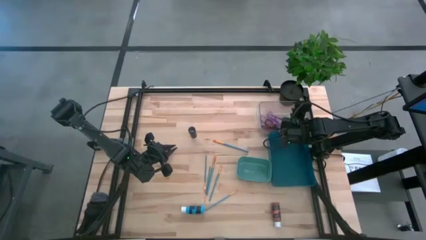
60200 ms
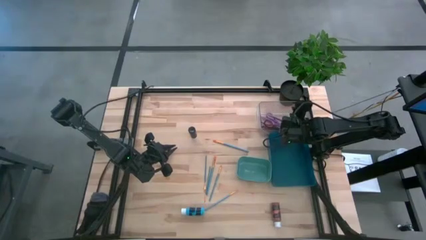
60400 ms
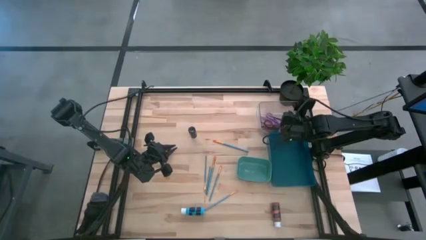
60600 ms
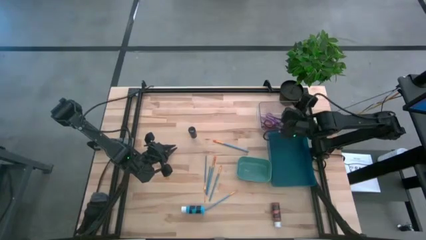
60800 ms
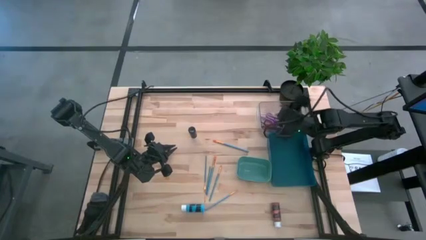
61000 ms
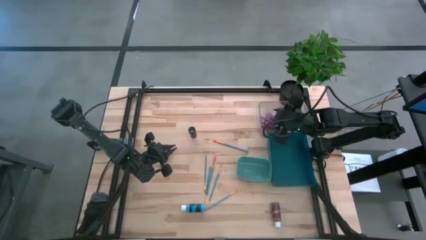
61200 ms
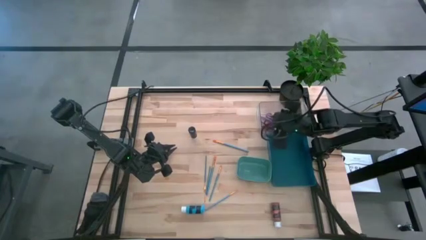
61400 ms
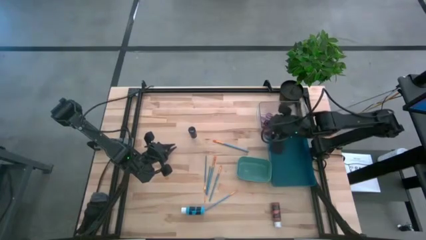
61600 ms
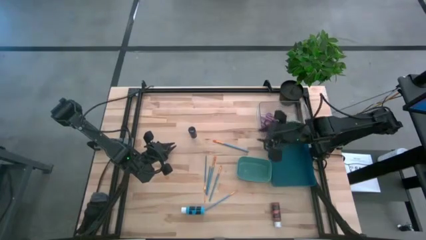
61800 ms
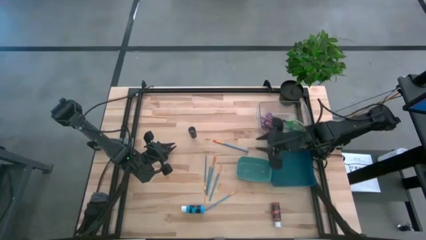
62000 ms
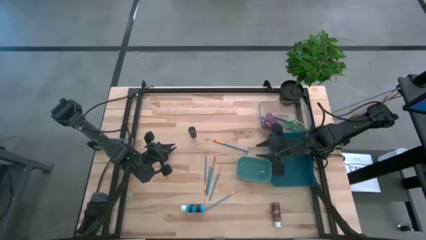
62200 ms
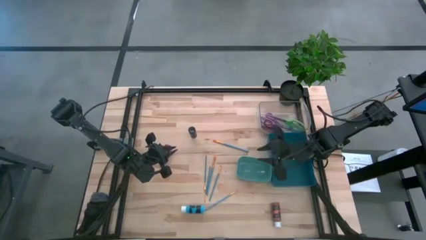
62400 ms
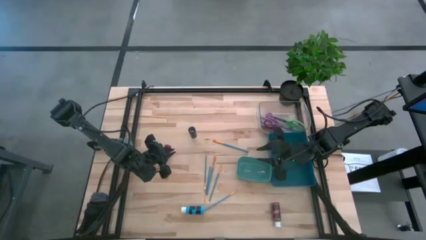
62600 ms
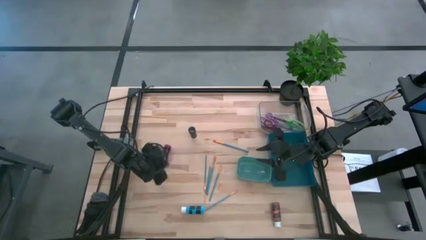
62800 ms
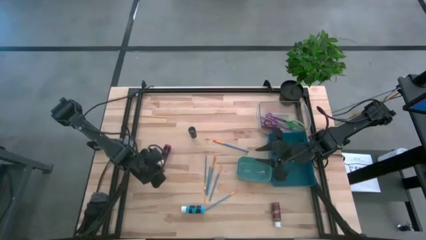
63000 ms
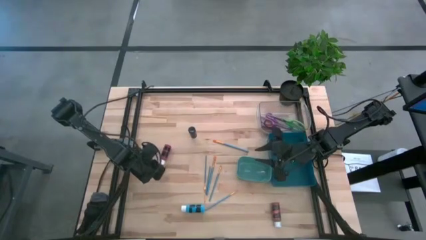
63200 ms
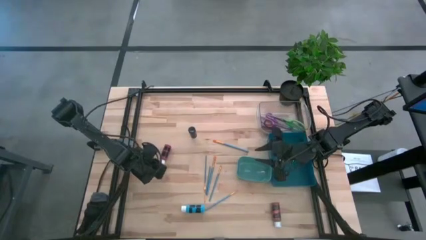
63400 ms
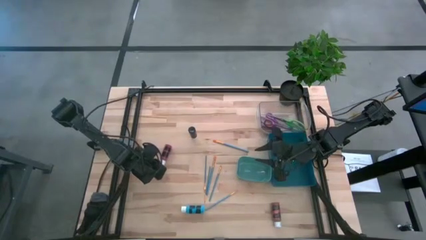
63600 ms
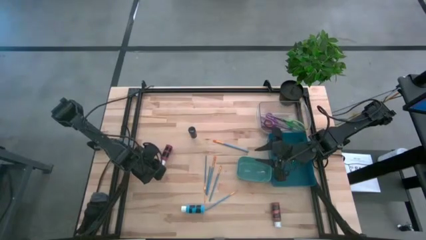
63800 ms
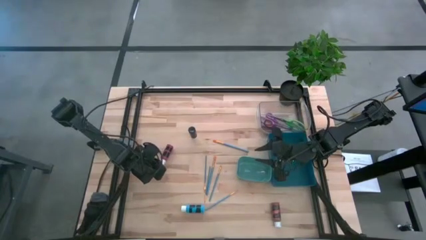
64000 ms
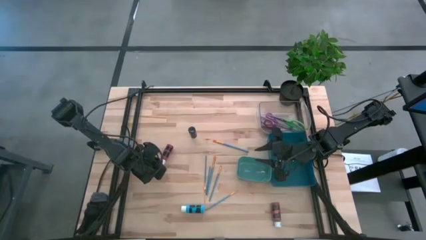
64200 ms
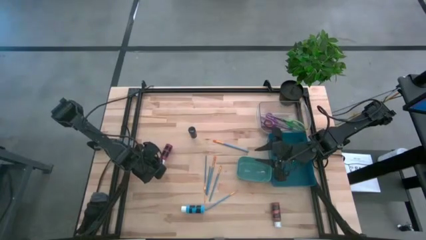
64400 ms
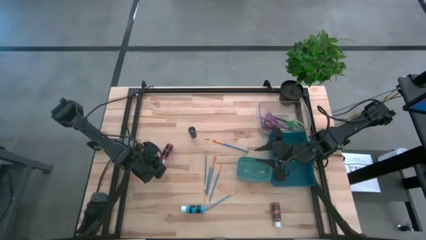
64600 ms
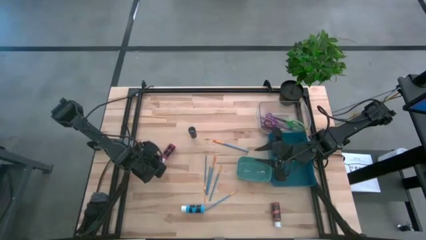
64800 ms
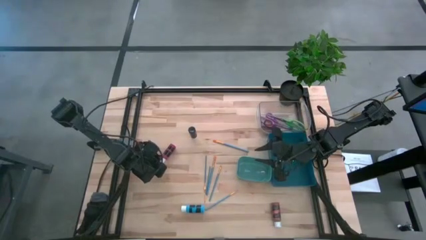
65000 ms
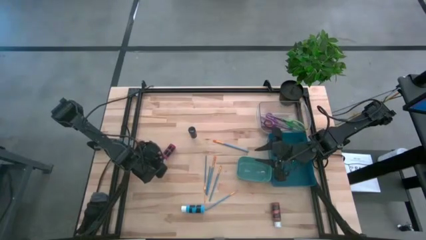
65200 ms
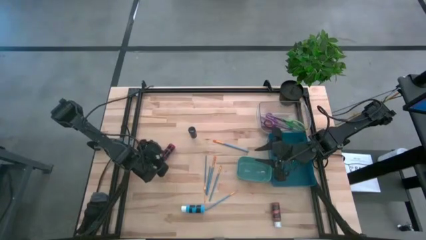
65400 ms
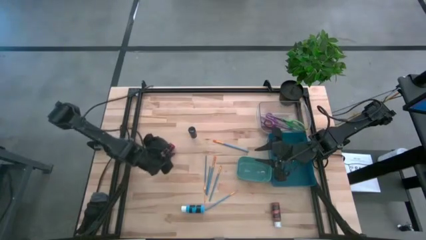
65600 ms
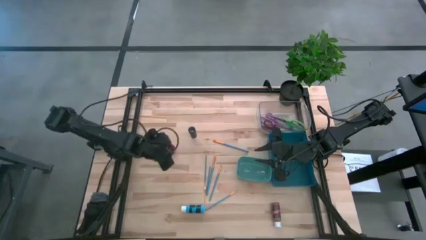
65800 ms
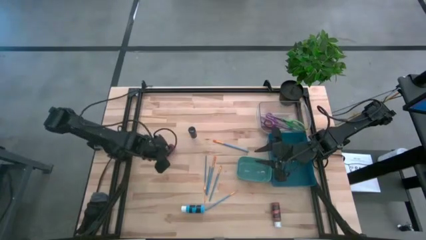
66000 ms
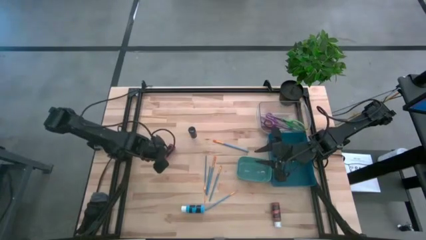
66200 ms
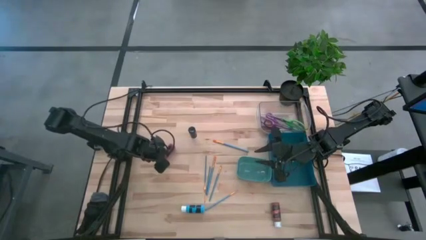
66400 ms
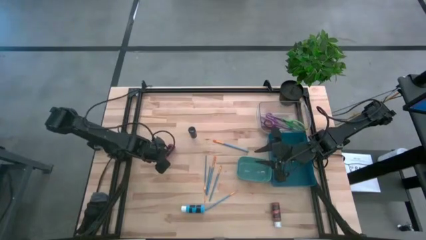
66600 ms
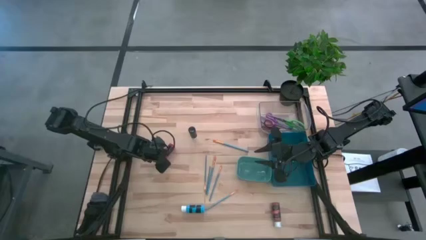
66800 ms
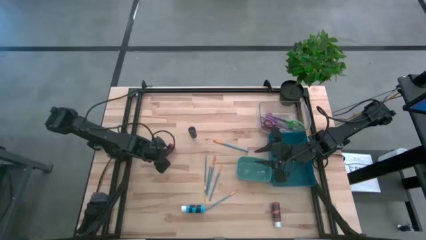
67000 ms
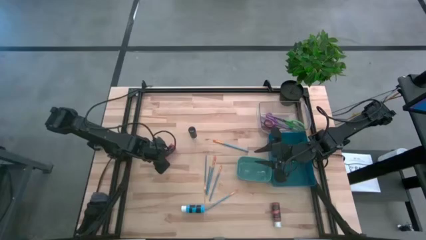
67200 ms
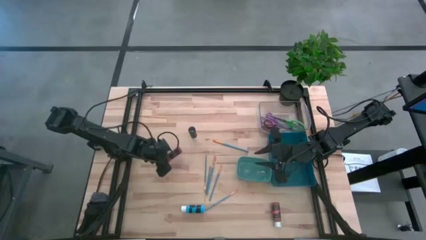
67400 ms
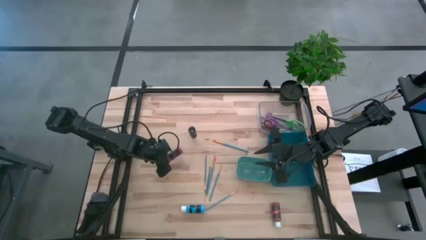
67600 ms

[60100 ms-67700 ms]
Task: Pick & Place Paint Supplies
Put the red paint bottle into the green bin

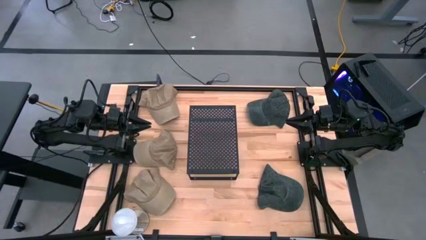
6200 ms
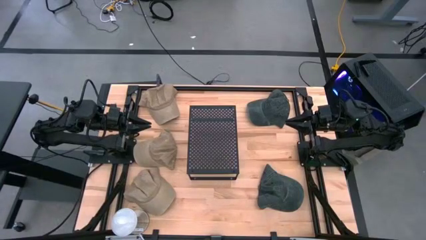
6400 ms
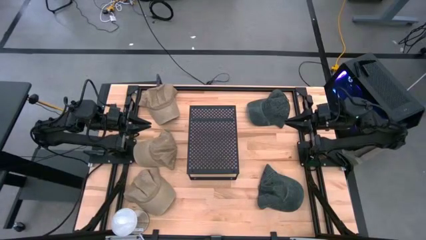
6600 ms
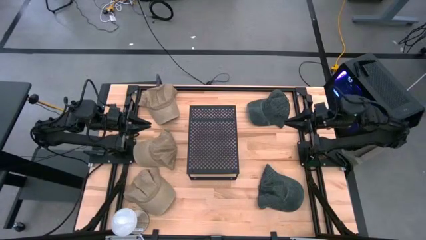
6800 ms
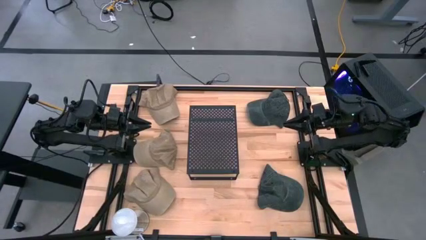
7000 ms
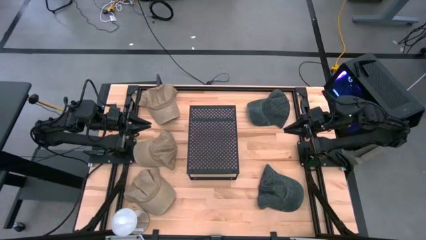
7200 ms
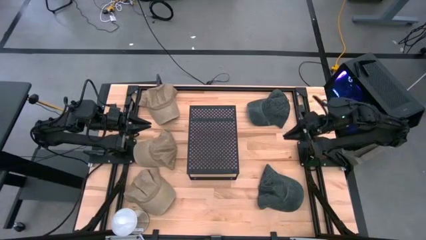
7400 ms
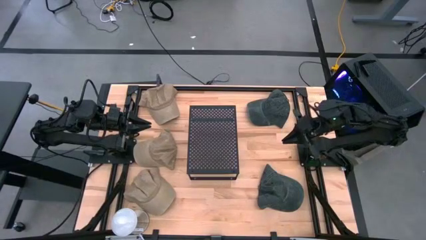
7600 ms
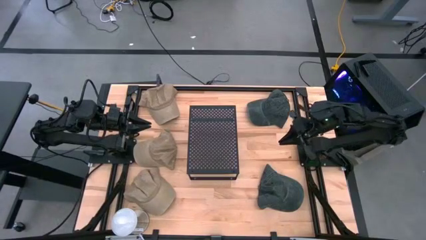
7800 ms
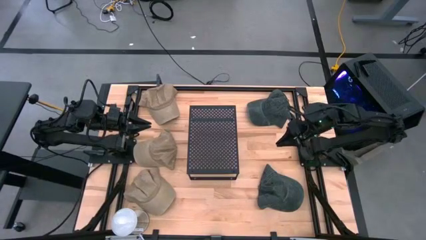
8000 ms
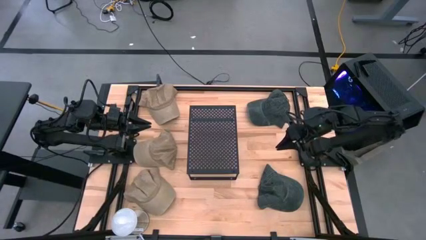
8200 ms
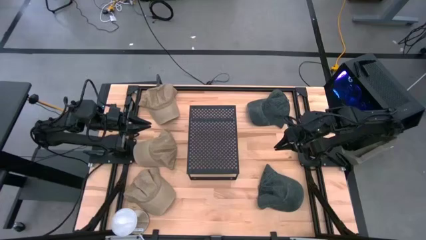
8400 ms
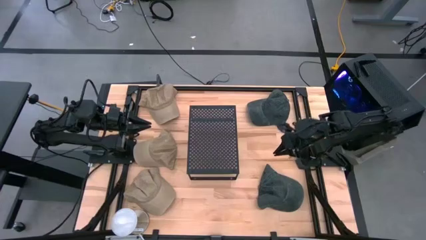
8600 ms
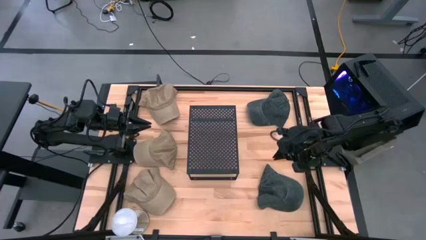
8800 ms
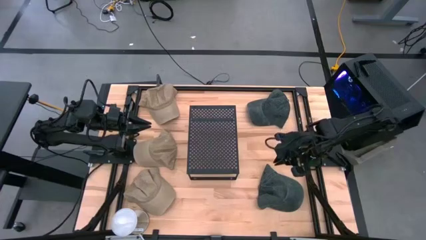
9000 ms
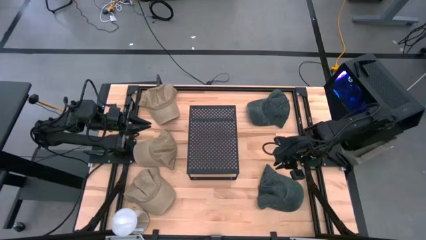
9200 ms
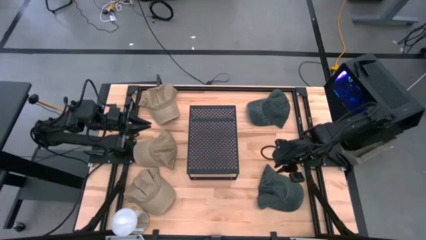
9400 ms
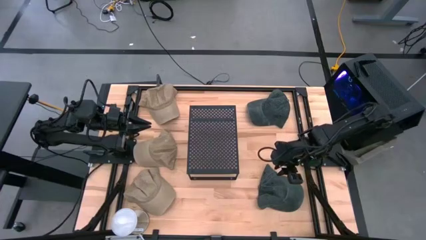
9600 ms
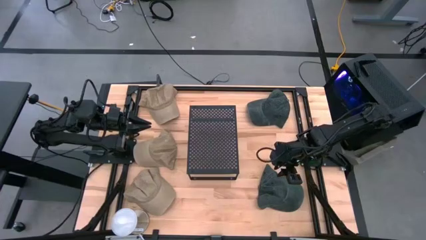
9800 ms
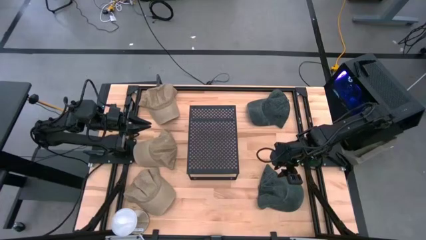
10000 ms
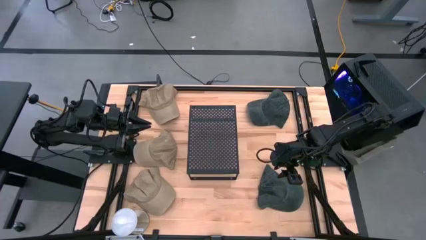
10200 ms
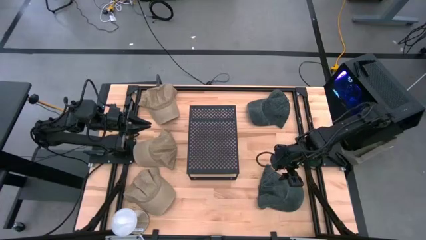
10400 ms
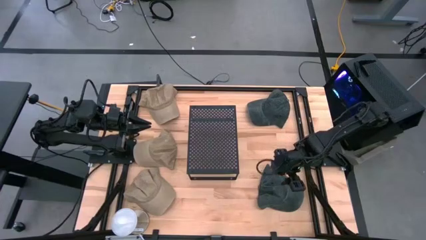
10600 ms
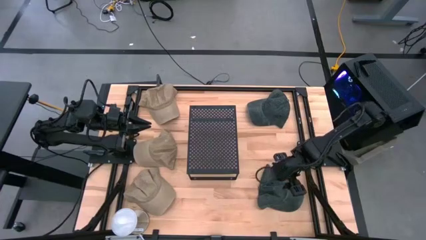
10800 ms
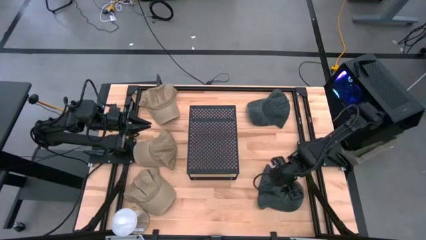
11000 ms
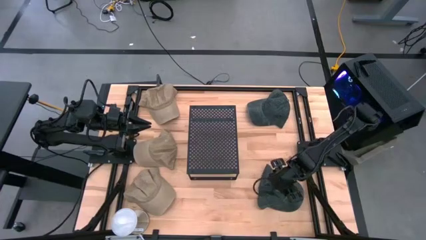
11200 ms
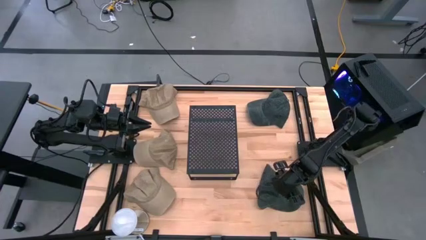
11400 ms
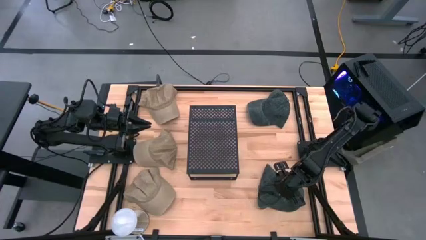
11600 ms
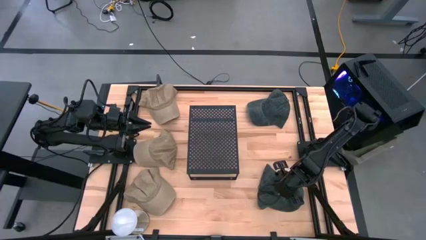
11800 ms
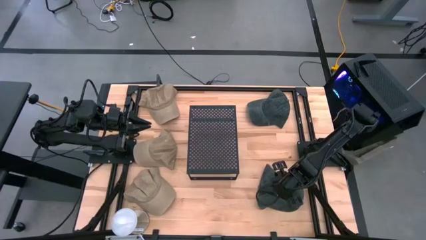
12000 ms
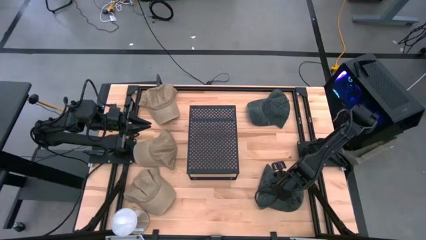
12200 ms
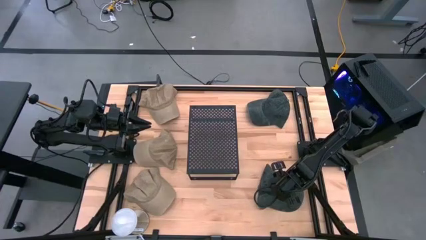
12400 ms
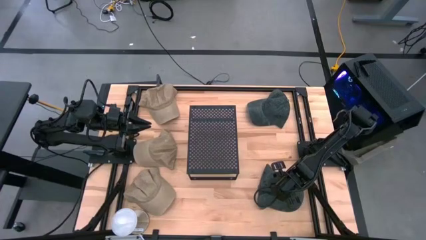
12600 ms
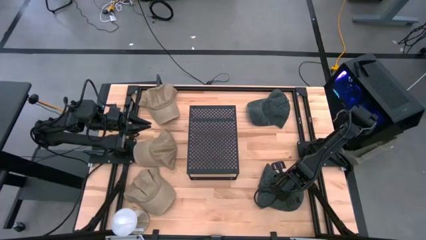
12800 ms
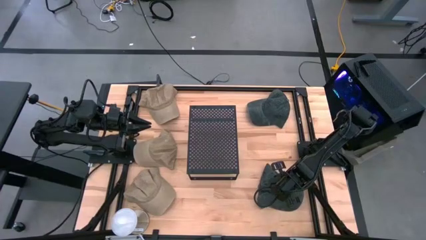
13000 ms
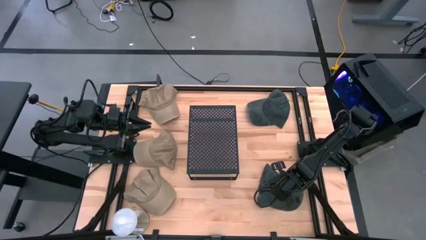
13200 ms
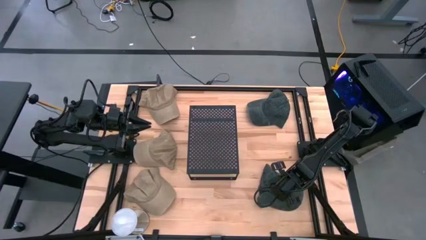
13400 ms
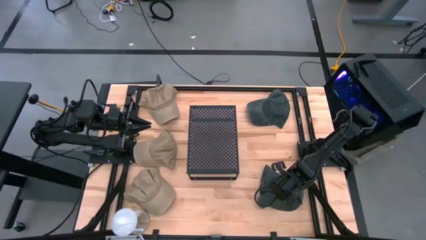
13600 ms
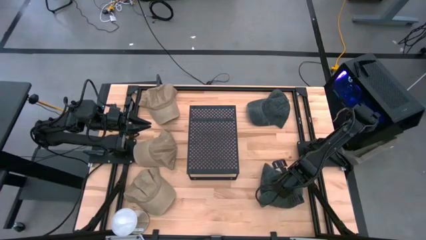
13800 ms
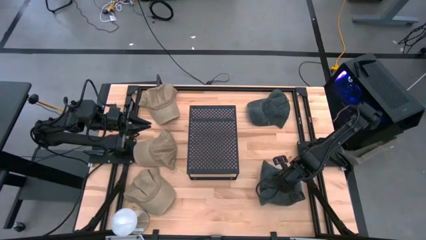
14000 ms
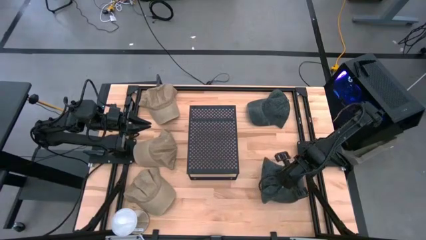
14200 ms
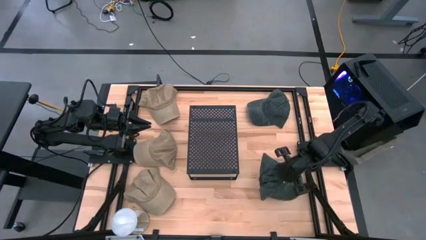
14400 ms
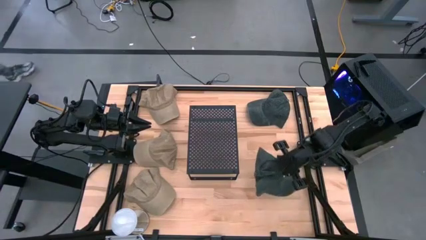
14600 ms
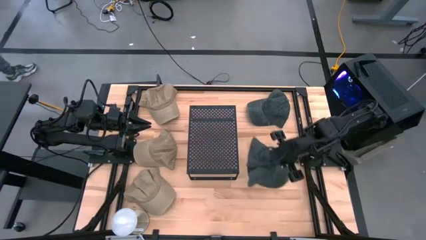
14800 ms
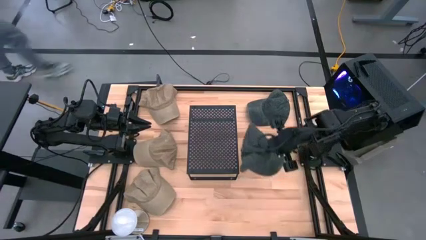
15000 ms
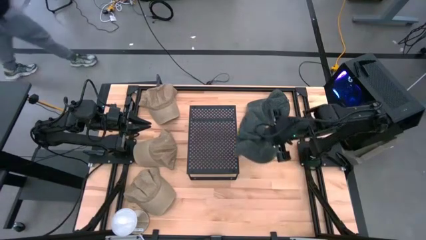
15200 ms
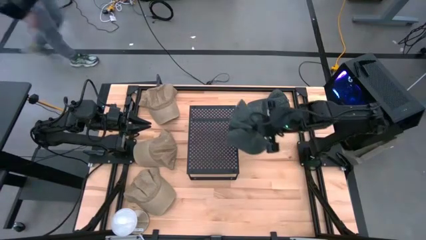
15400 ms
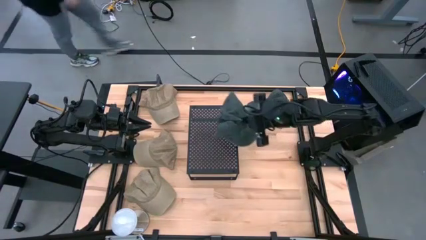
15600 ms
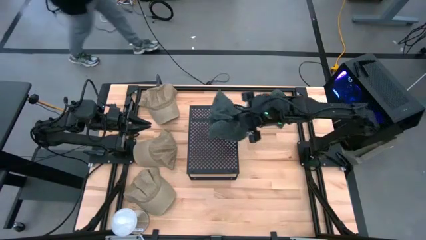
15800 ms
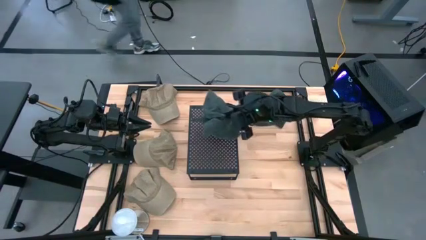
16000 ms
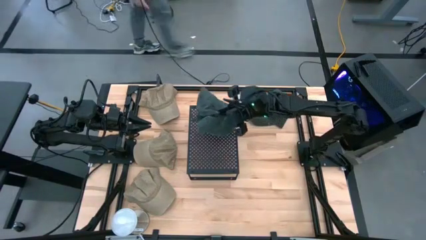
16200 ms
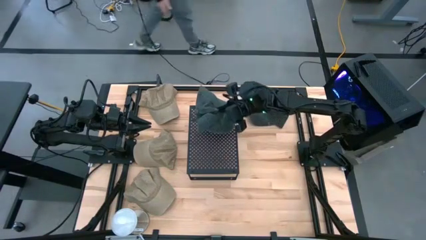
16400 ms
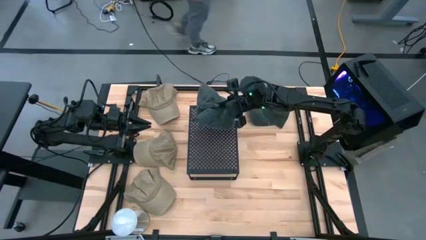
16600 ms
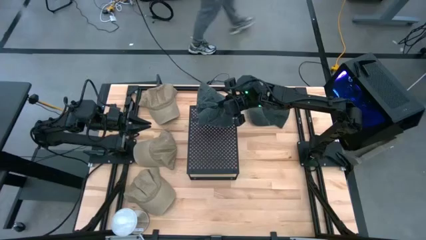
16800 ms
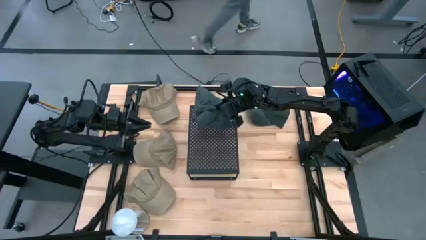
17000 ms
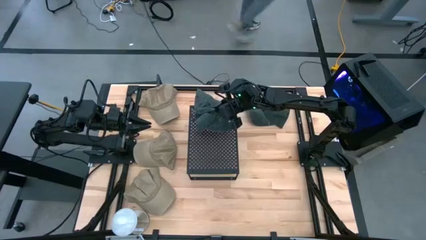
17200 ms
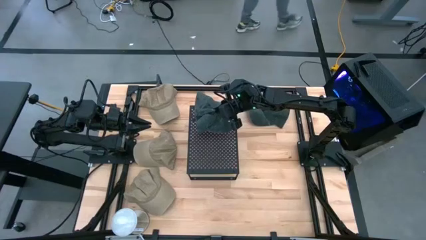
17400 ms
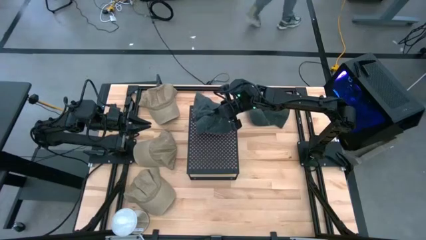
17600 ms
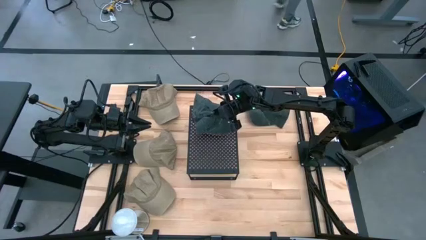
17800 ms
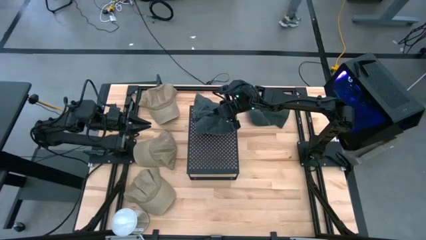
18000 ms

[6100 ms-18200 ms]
Task: Pick & Place hat
Put the bottom gray cap on the shelf
